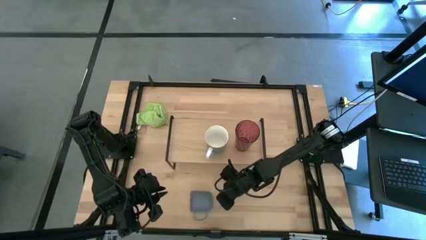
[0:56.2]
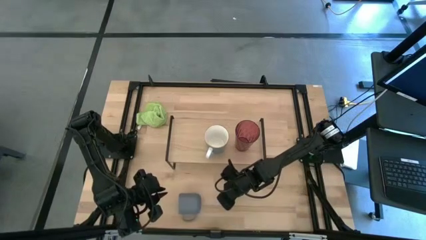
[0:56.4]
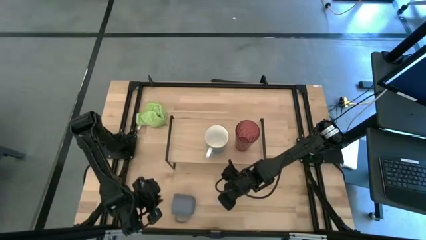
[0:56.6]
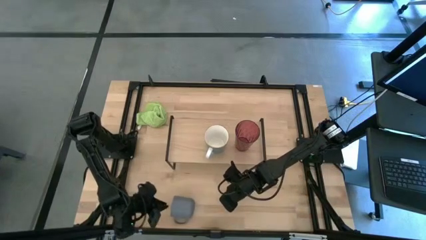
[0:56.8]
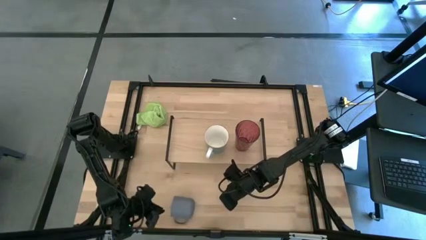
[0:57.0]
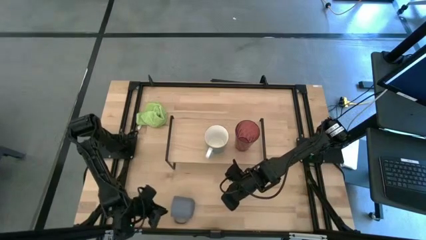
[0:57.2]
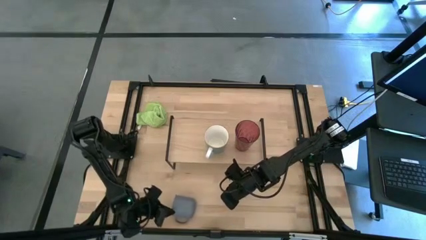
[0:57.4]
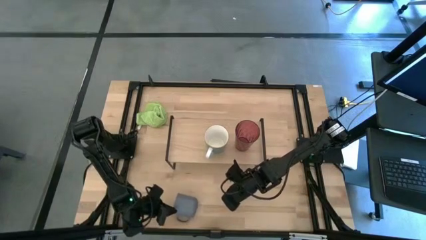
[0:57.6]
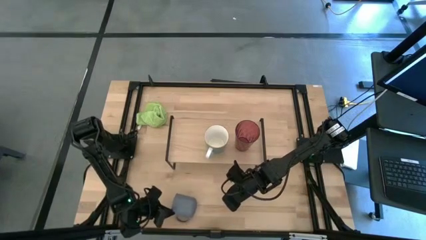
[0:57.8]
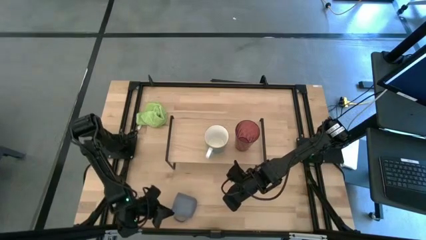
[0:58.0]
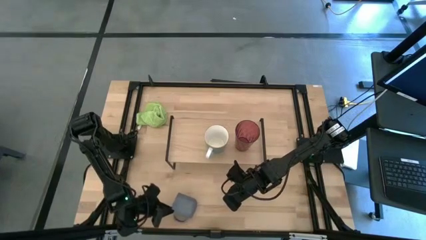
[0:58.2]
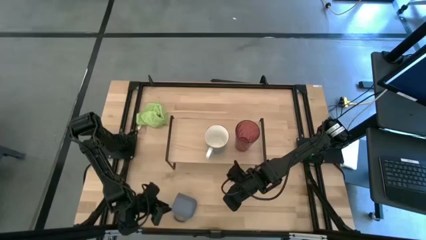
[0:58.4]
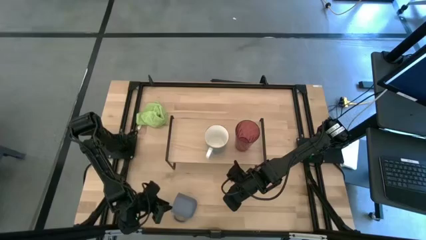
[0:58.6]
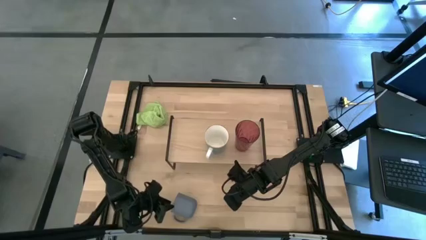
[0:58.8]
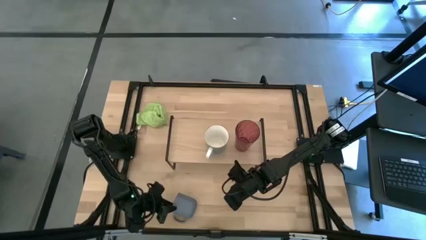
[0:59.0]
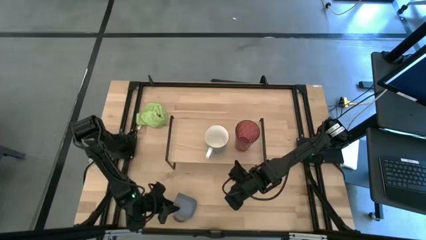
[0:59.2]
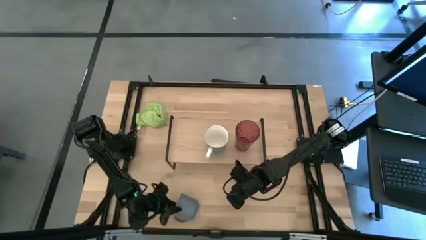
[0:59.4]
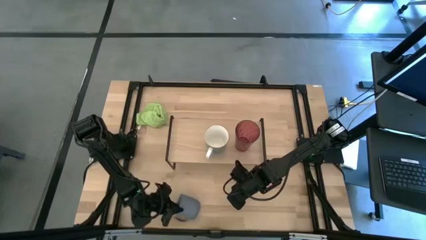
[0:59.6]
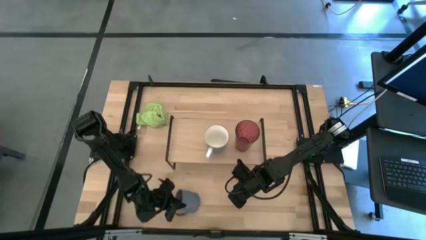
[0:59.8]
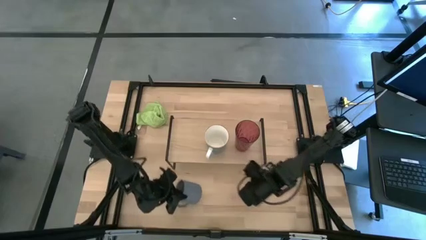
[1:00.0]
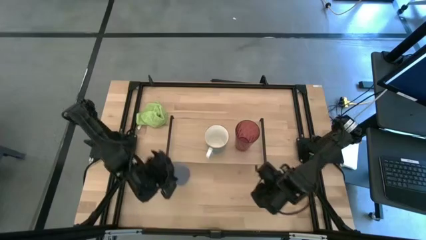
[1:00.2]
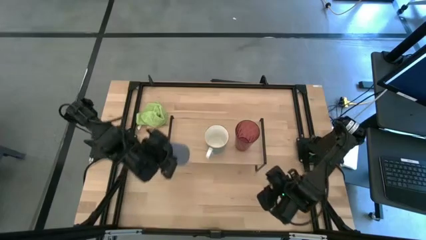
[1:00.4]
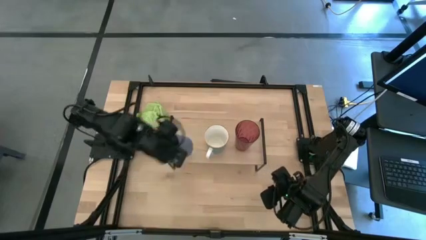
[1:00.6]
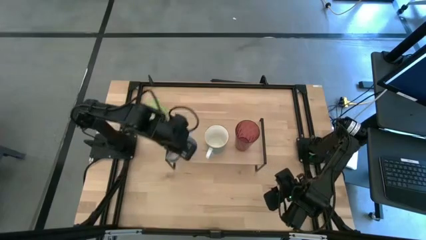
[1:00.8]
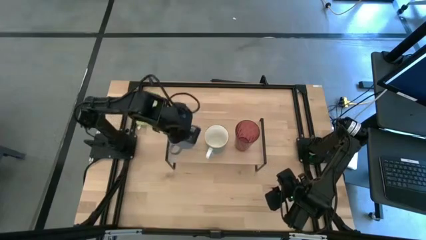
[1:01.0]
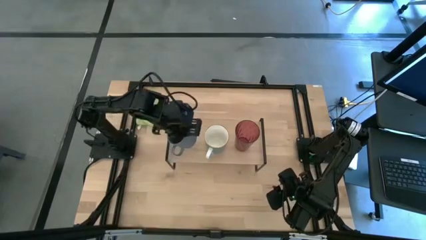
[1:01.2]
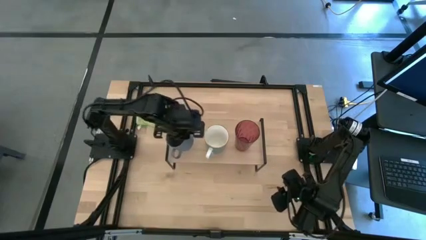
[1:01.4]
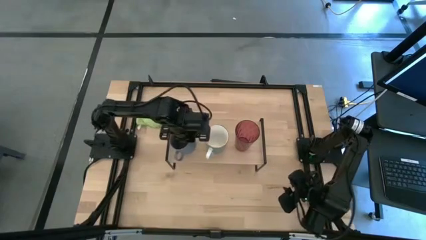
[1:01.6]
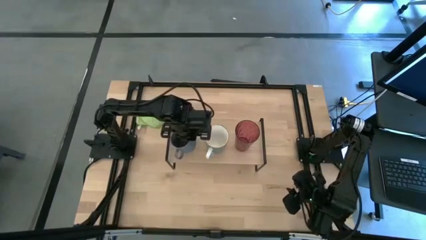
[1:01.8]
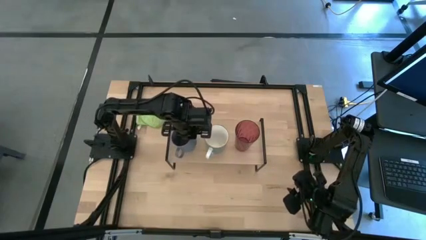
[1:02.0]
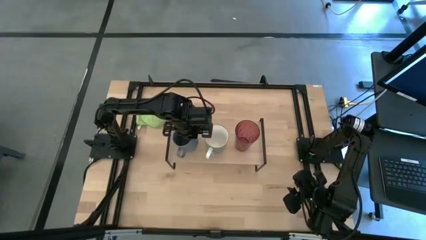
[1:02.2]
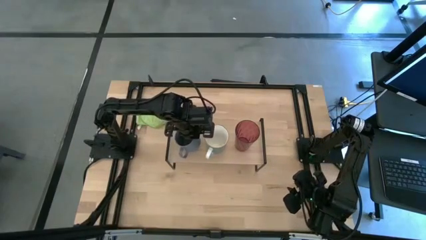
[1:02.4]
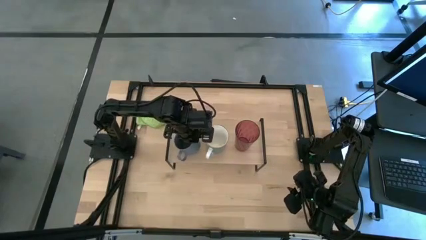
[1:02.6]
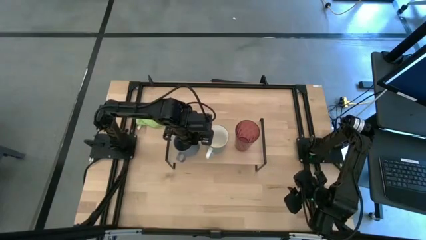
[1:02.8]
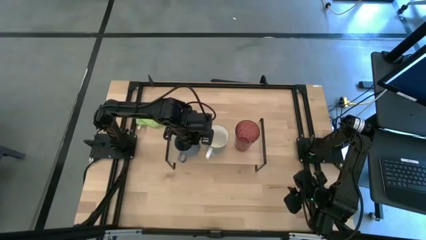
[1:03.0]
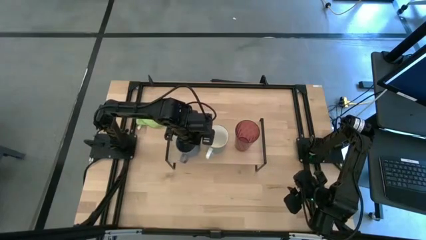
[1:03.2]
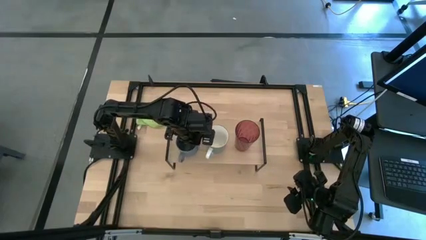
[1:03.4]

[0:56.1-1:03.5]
Task: Stack small to large cups/mugs on shelf
Put the blue mug on the shelf

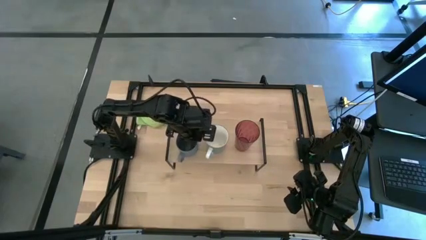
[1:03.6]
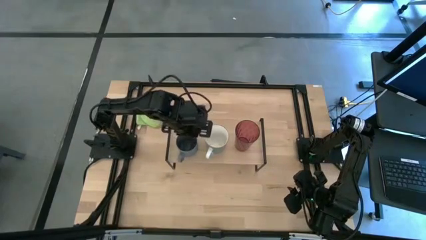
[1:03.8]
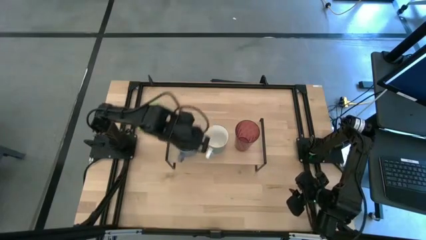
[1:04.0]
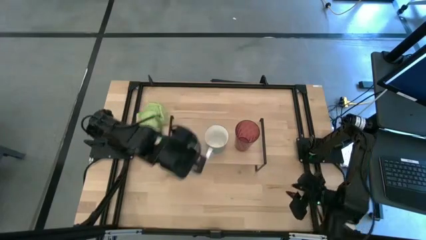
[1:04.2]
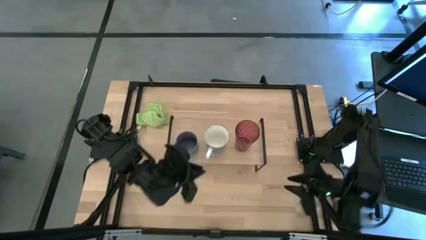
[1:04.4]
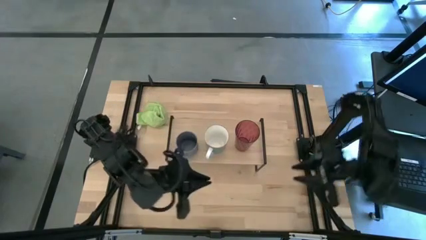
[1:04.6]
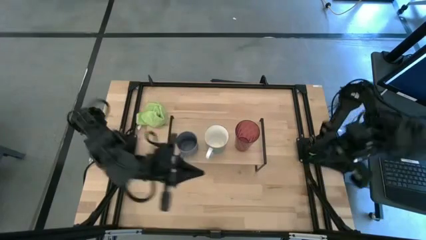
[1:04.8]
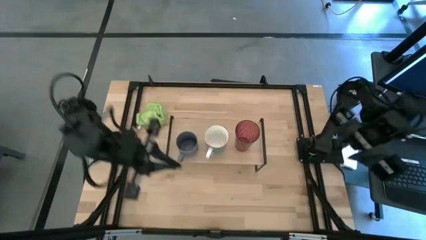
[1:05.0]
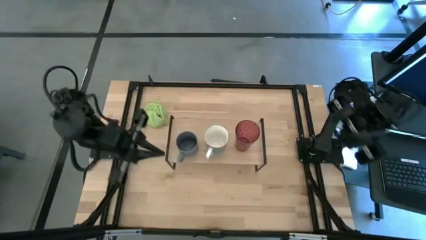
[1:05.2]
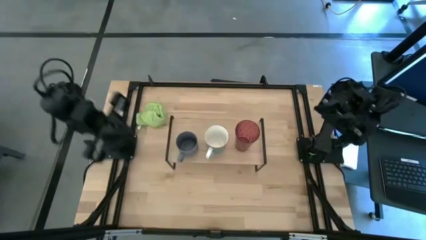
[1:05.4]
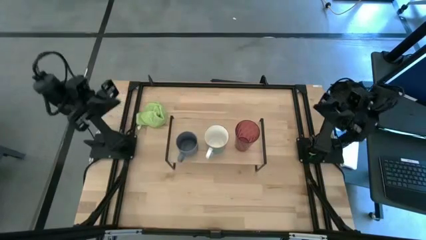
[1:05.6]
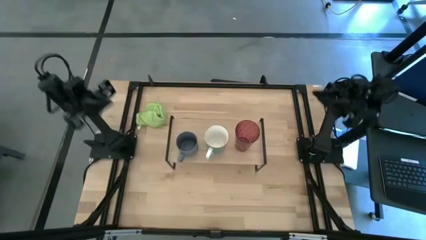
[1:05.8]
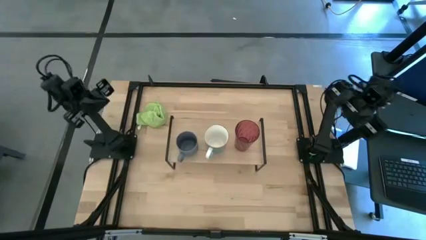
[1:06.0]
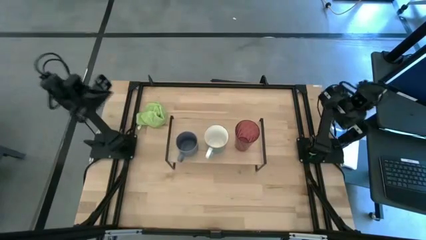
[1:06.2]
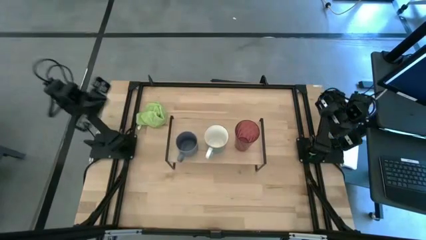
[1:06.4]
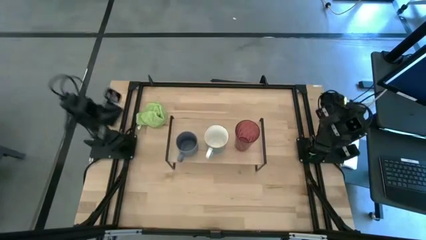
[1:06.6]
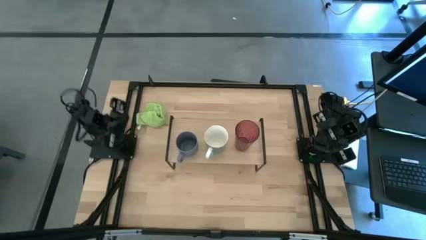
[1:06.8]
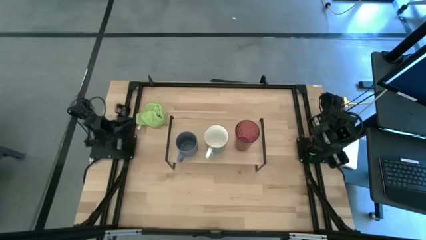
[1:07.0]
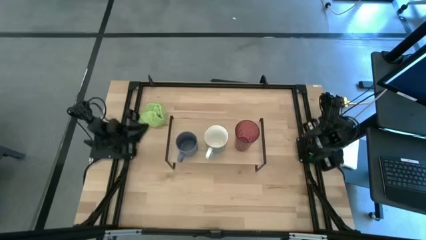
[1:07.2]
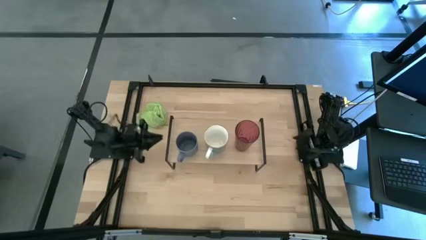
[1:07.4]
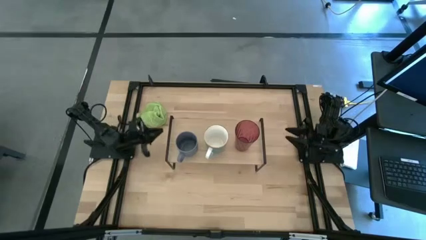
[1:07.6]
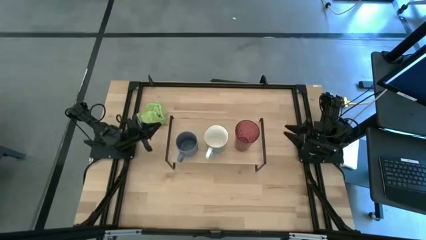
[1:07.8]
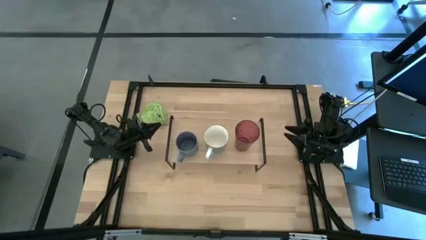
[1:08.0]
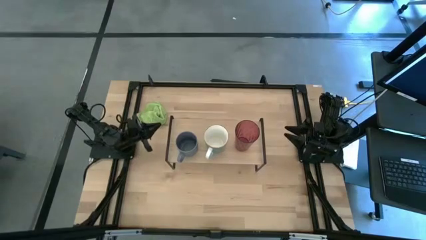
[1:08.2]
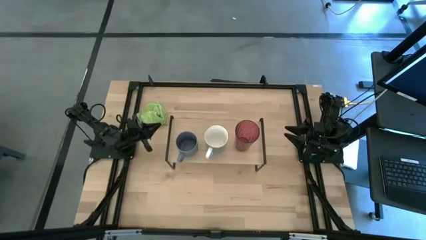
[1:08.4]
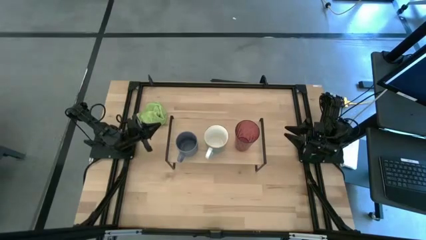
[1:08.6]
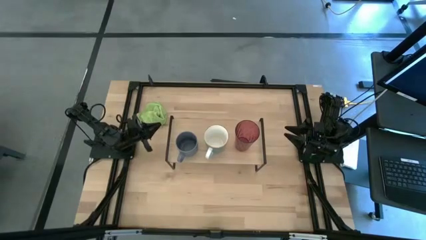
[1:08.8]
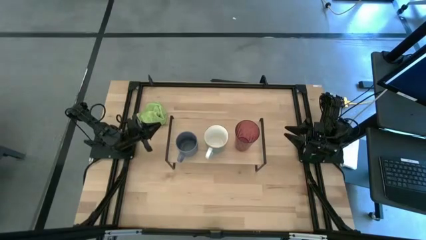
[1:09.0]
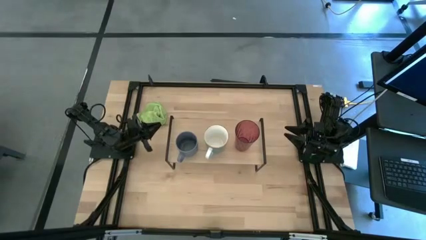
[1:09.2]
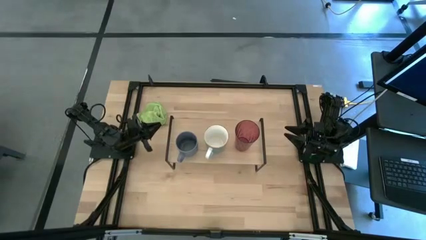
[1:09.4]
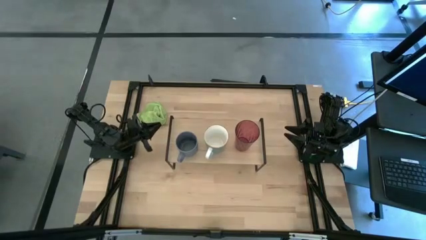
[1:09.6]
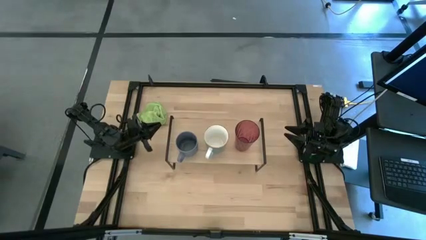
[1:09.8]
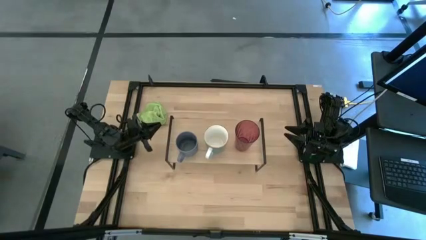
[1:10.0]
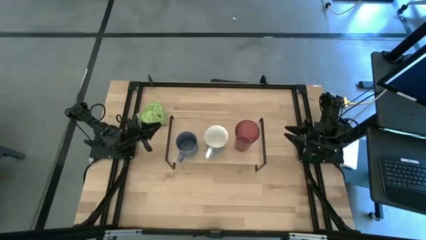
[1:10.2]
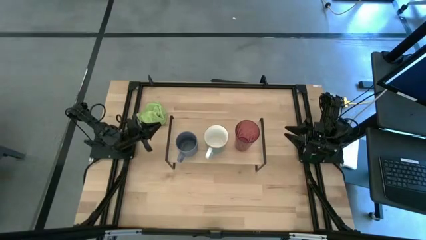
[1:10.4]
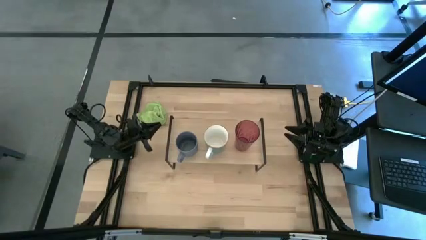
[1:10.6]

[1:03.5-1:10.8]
Return to Home Position
